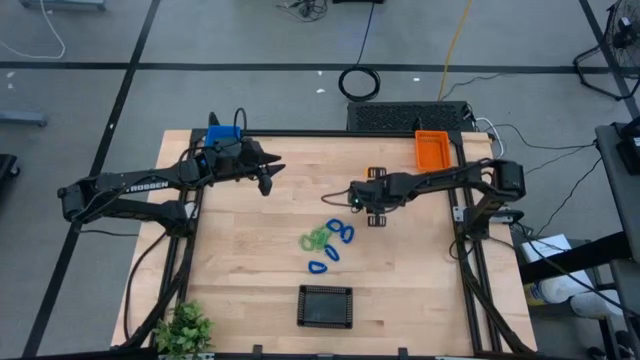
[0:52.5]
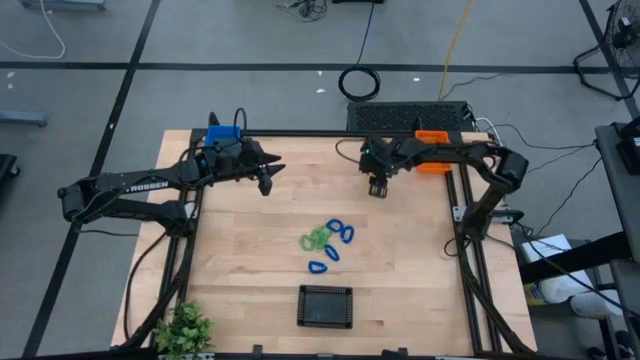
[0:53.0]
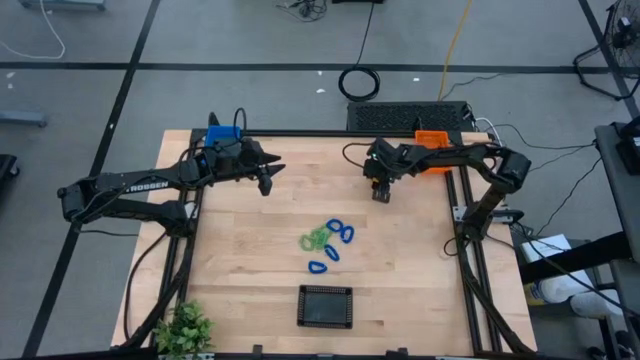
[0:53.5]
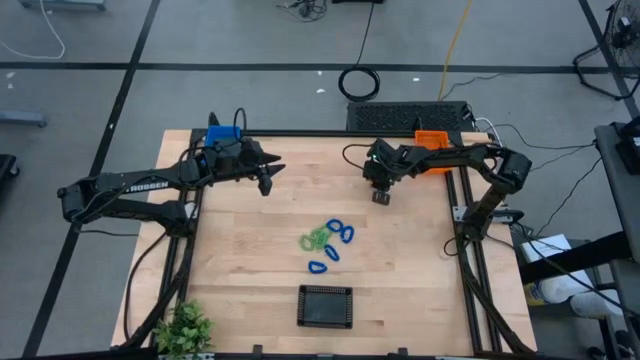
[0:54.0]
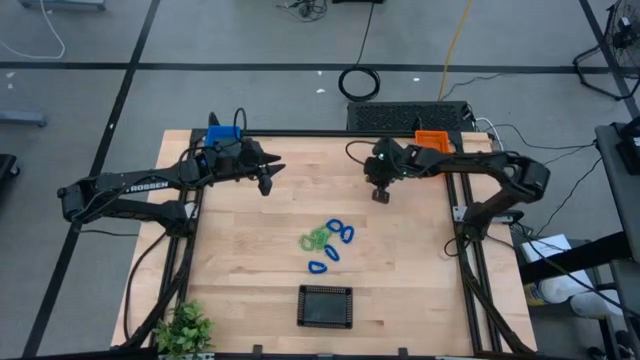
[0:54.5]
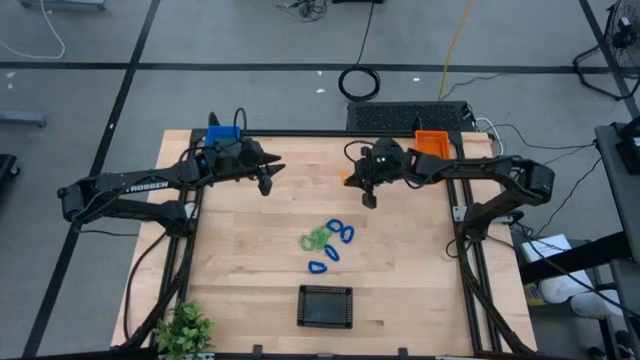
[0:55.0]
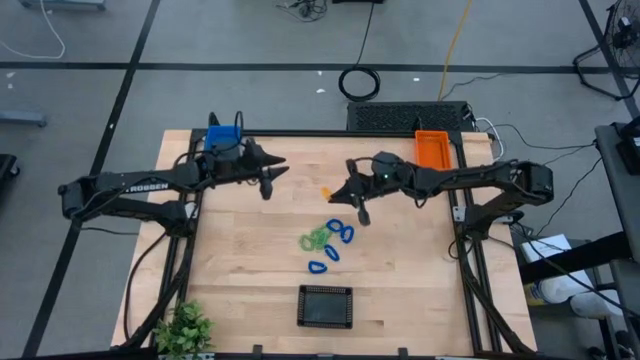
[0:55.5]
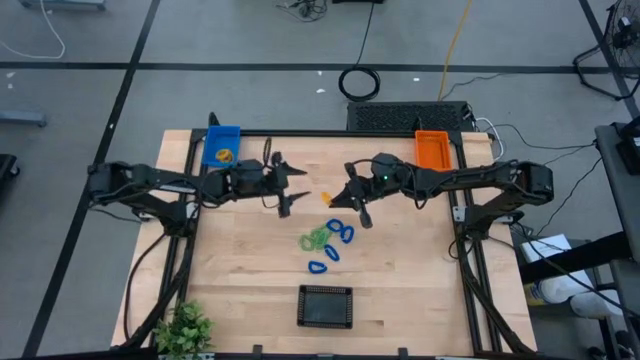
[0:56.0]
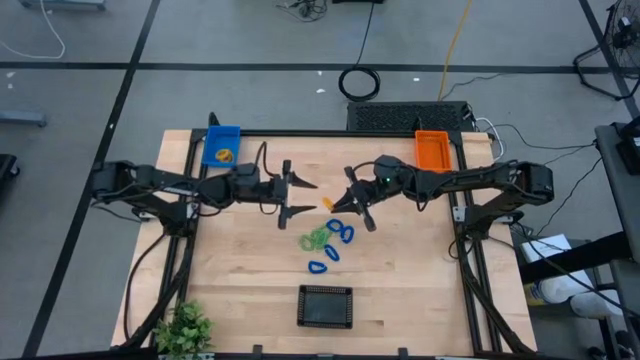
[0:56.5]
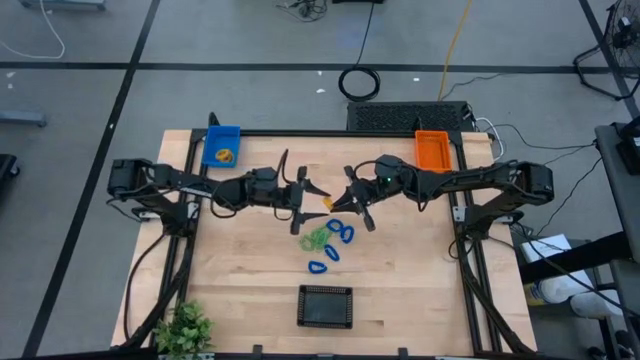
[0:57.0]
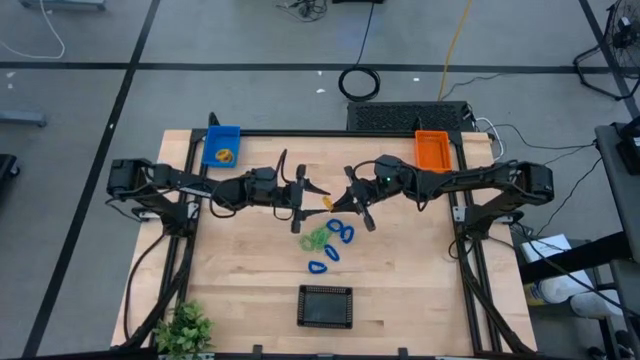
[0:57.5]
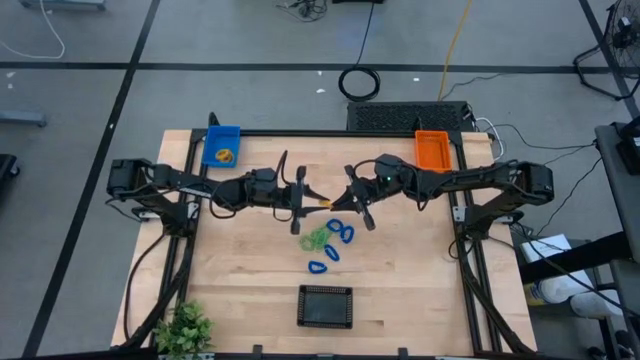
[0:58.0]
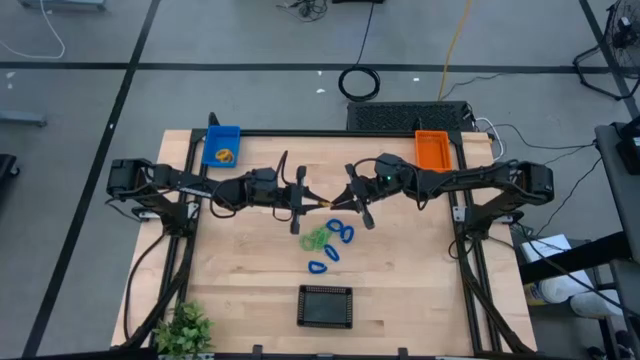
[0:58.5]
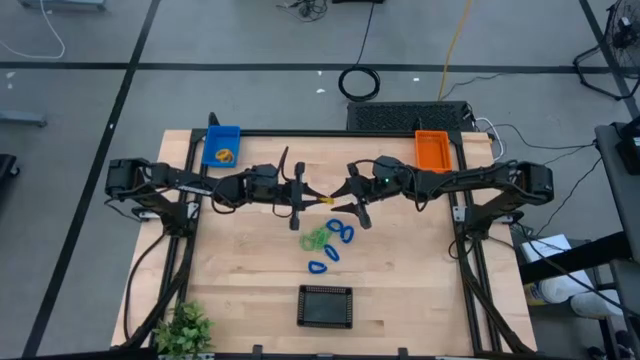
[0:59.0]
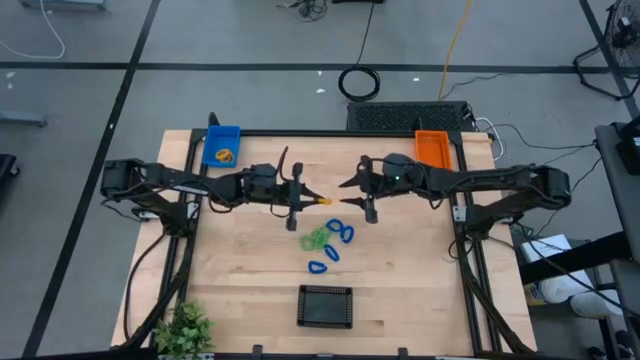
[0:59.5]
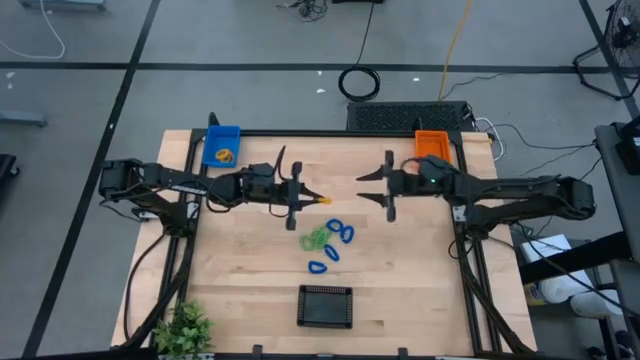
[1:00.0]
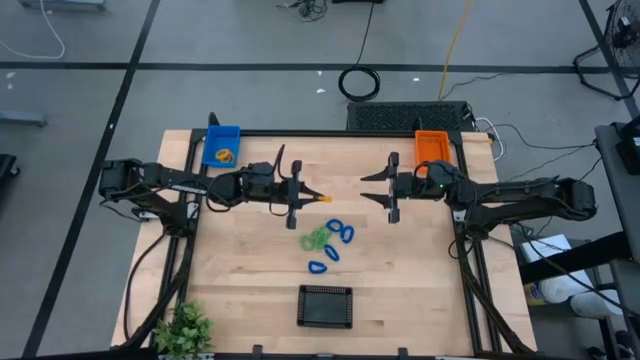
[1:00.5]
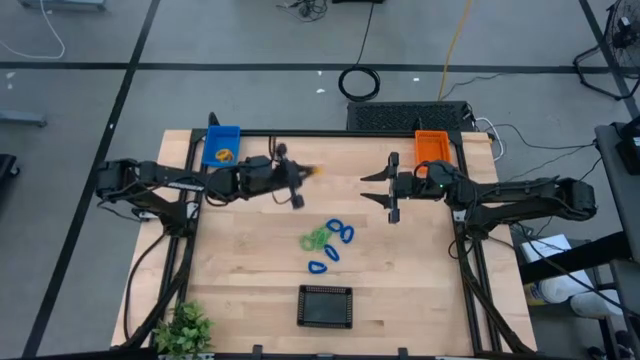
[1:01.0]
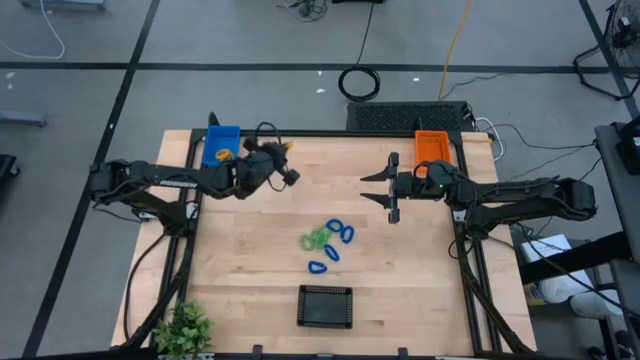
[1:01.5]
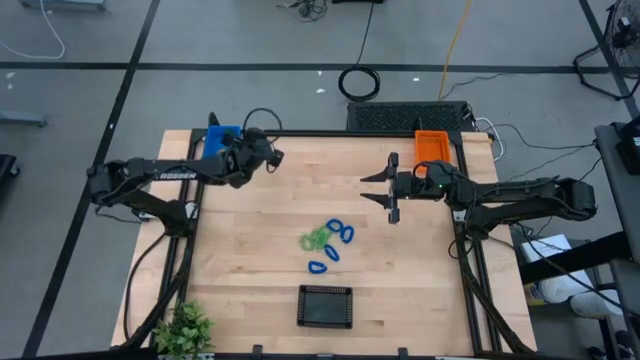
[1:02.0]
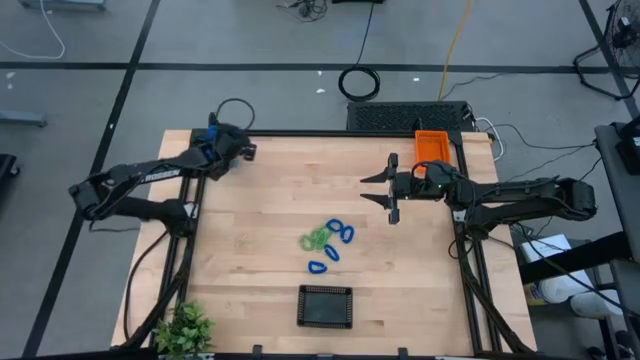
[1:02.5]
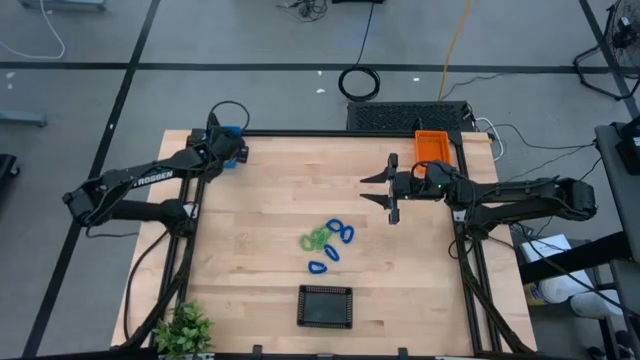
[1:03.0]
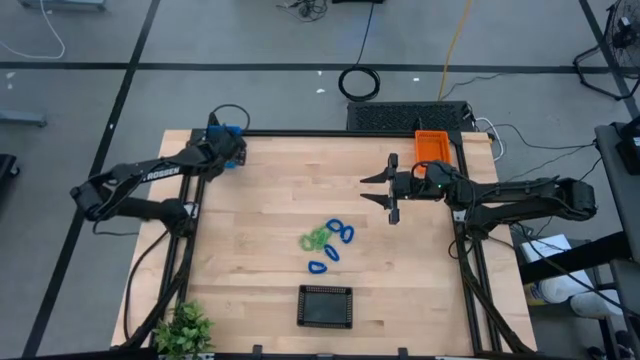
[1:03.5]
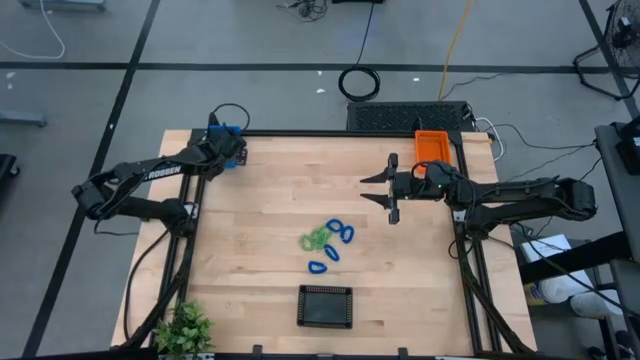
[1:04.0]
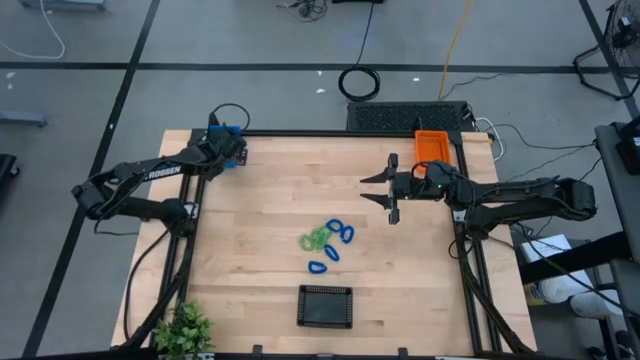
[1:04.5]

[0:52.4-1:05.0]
Task: Sort spring keychains into baskets
Put the orange spring keychain into the blue basket

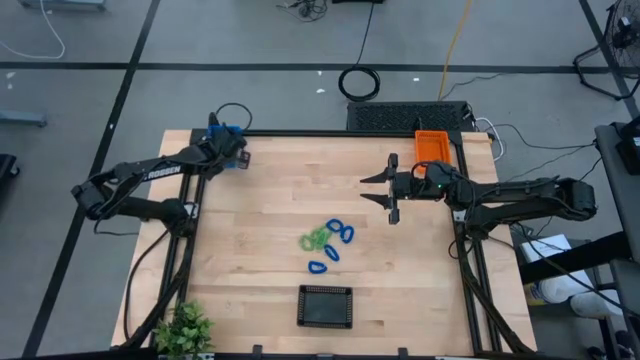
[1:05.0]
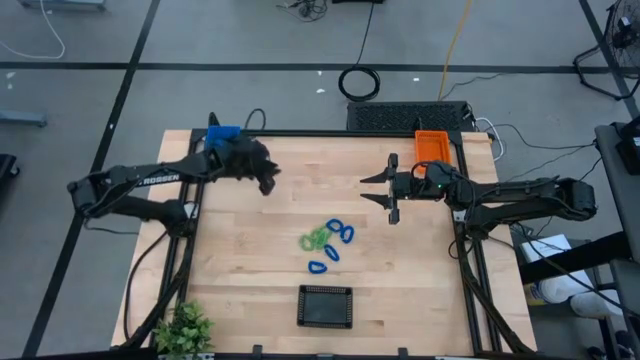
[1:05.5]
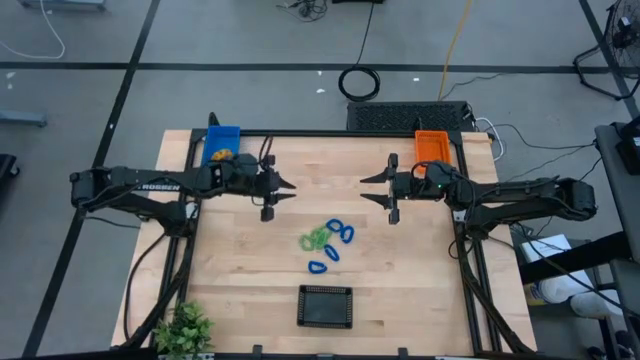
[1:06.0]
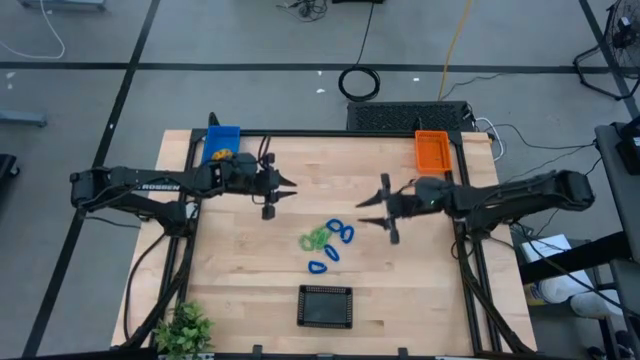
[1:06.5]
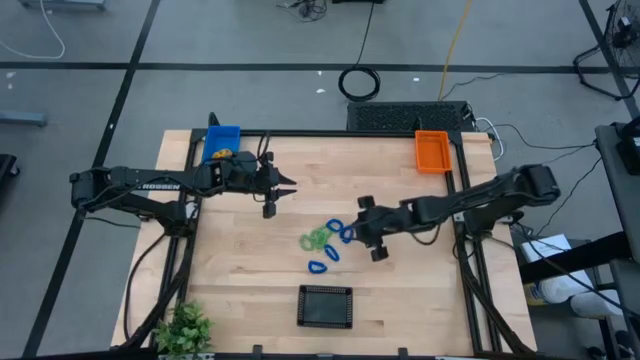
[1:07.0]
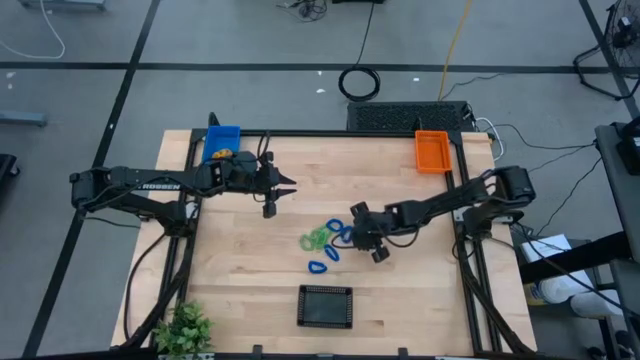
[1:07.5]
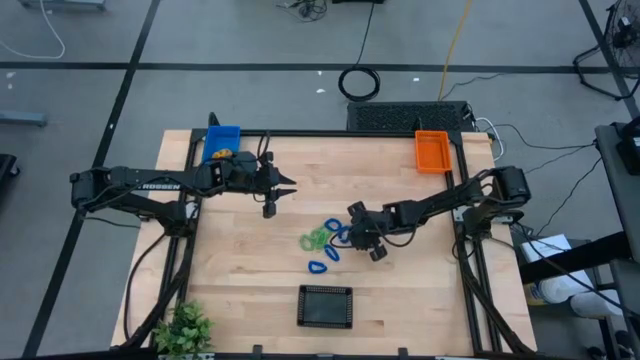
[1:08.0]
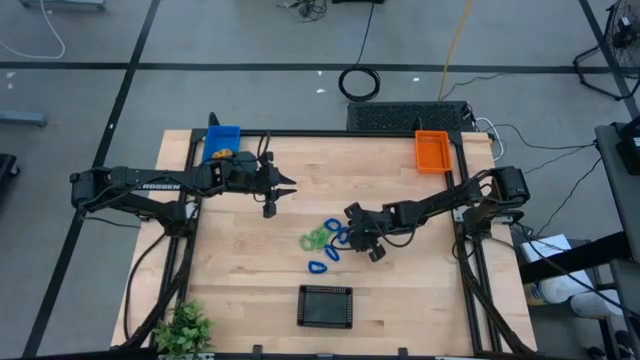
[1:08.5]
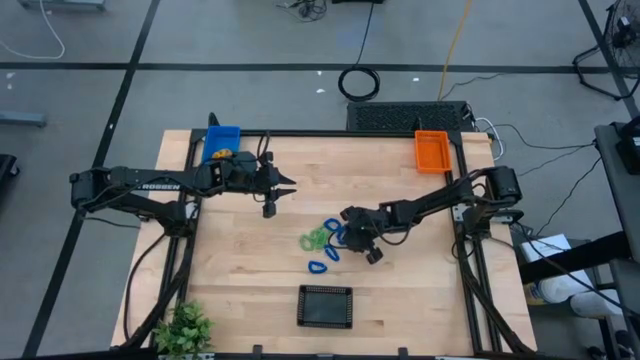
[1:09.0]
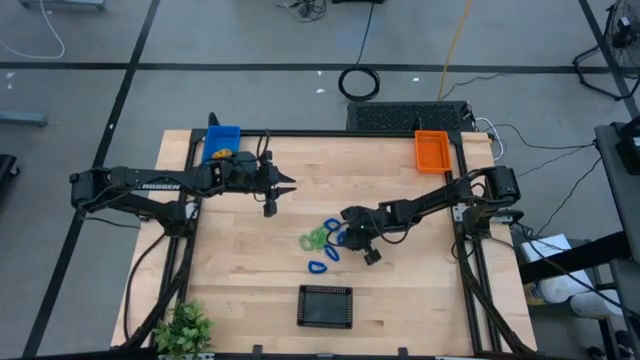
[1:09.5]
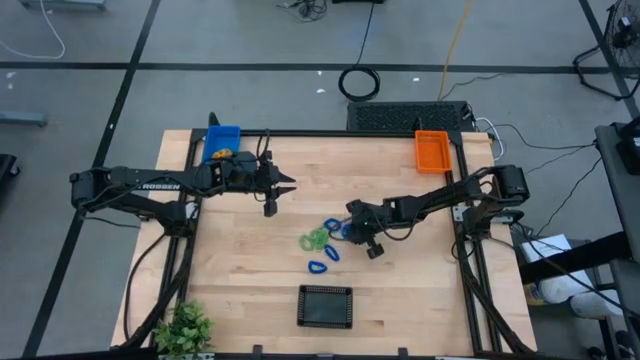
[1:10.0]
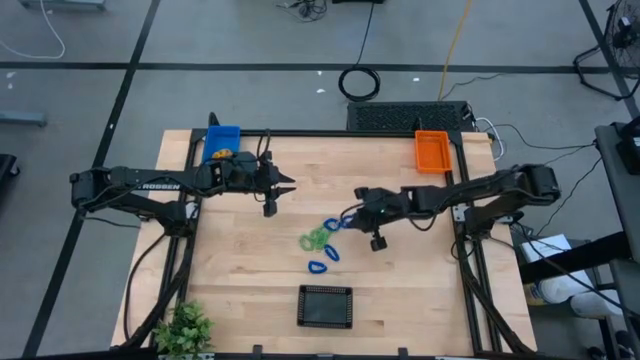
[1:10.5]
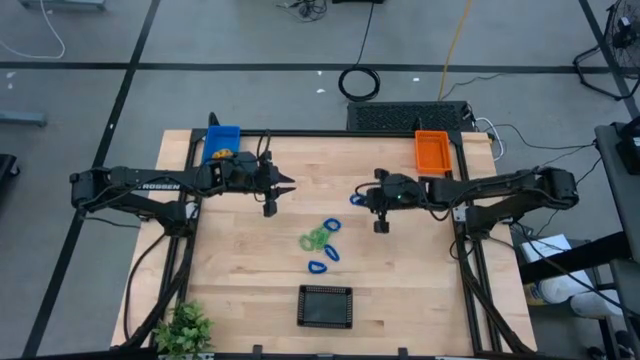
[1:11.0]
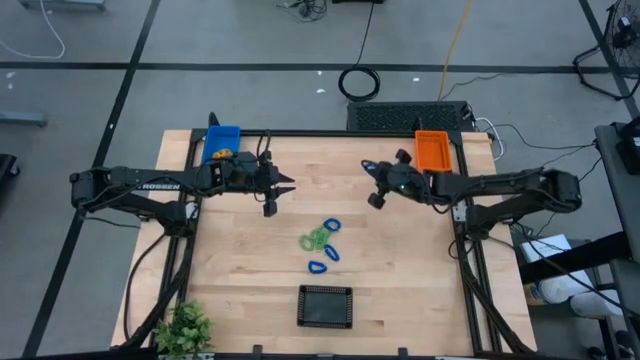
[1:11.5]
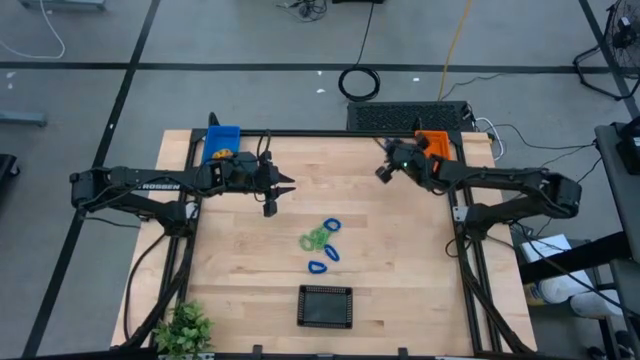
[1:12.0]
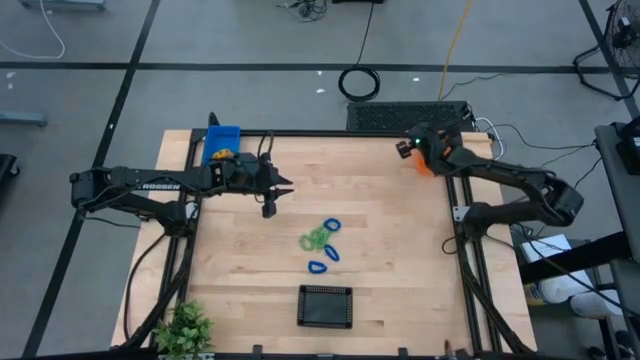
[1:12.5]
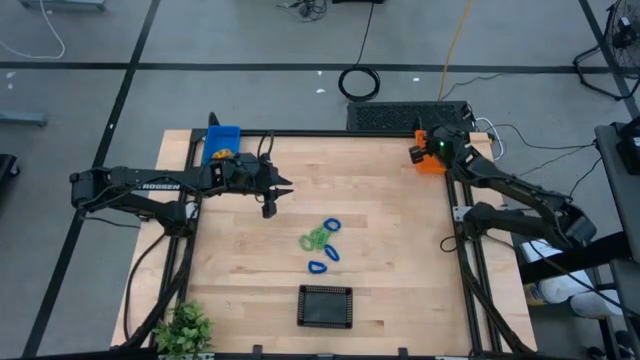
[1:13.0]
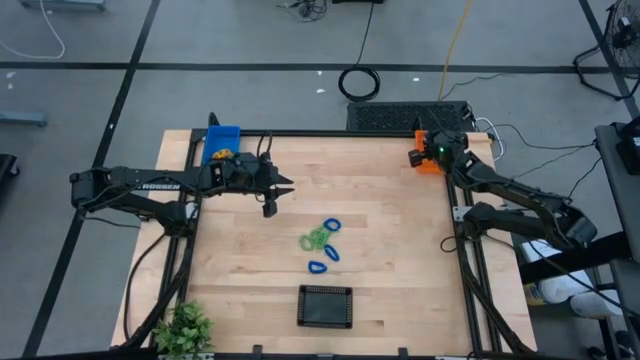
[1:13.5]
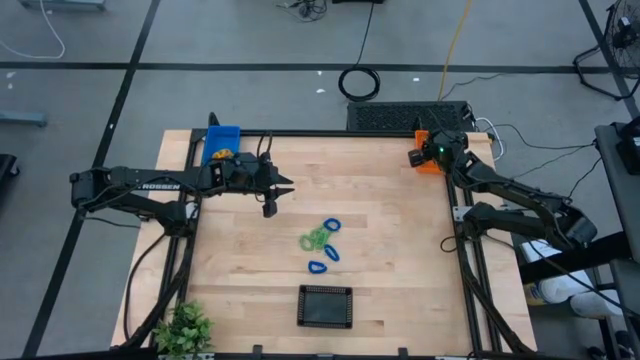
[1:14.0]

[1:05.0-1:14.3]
Put the blue spring keychain into the orange basket
